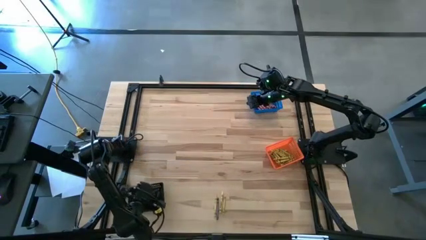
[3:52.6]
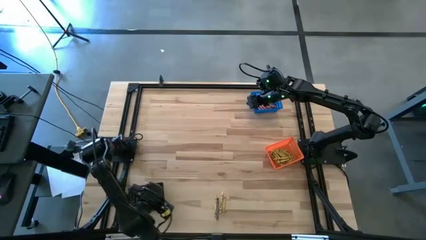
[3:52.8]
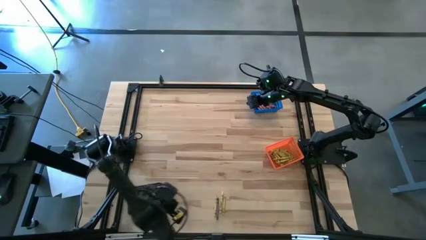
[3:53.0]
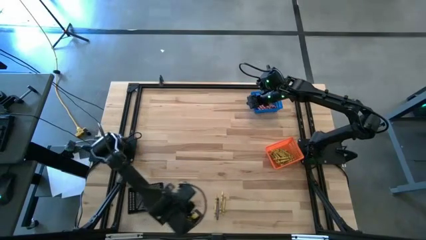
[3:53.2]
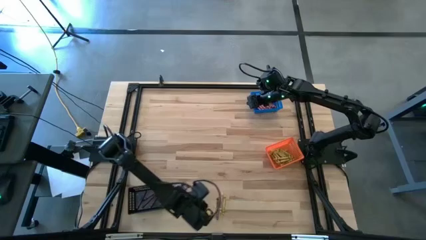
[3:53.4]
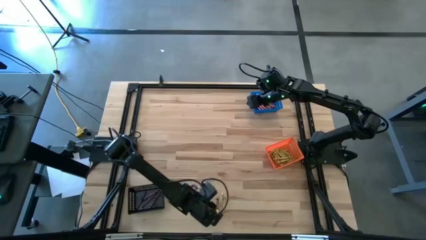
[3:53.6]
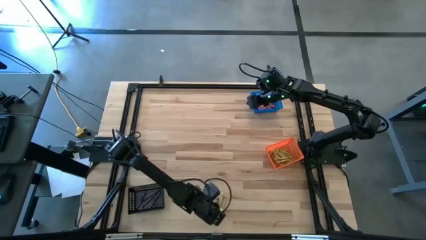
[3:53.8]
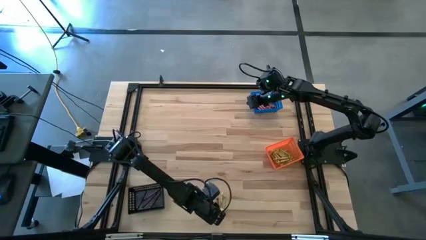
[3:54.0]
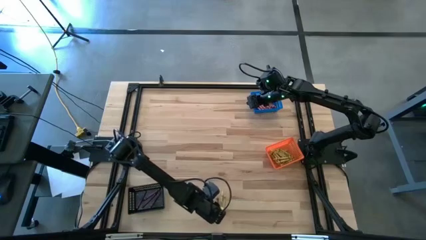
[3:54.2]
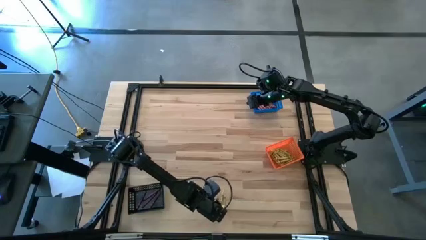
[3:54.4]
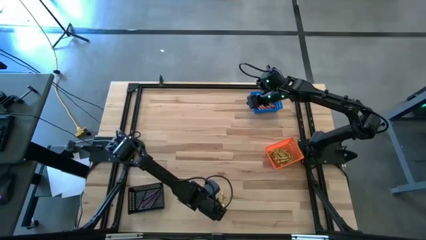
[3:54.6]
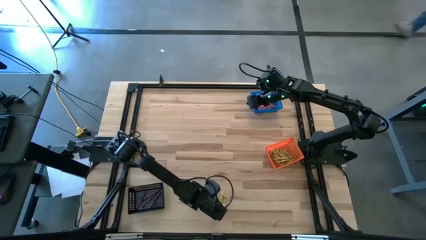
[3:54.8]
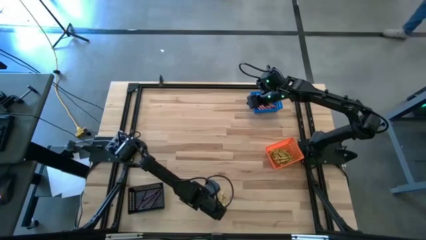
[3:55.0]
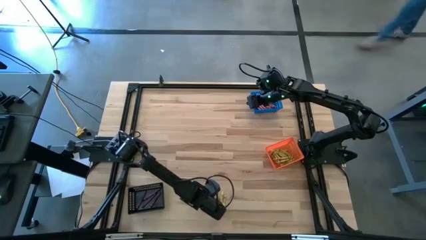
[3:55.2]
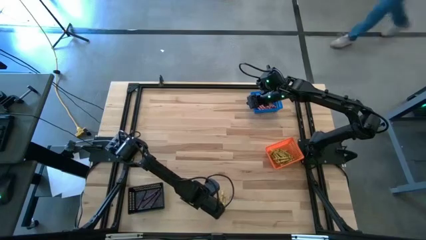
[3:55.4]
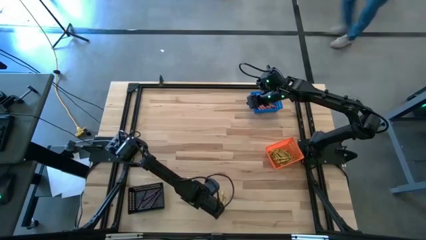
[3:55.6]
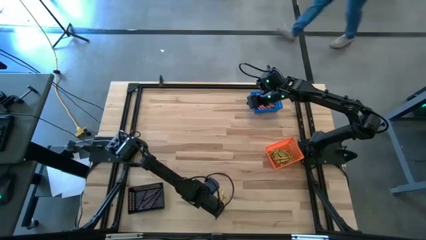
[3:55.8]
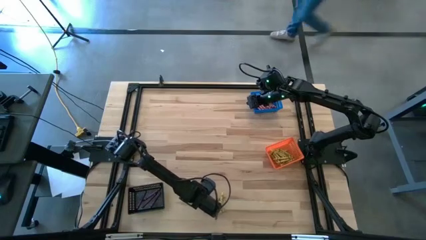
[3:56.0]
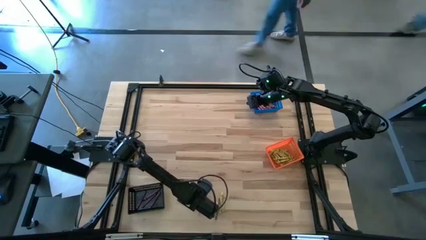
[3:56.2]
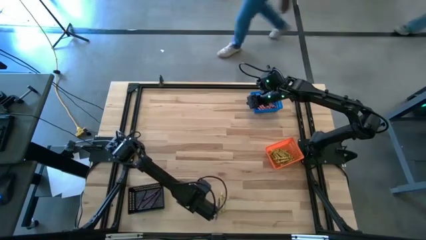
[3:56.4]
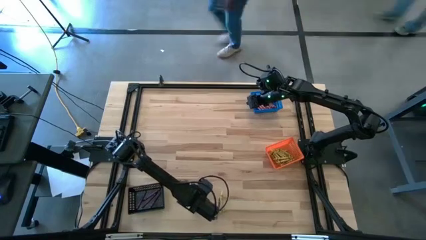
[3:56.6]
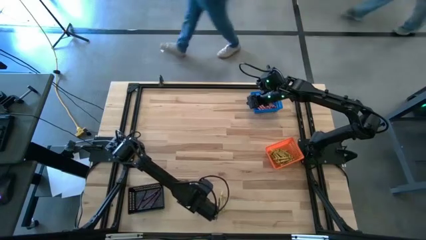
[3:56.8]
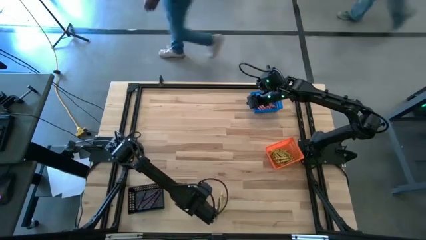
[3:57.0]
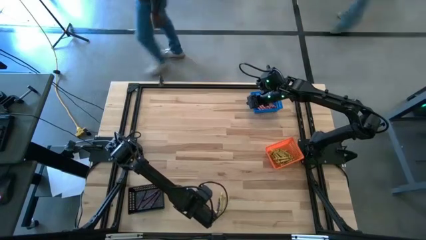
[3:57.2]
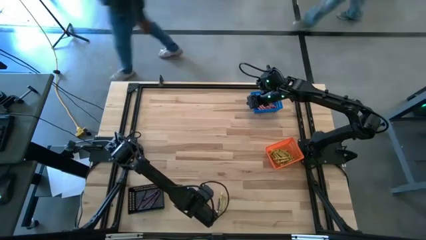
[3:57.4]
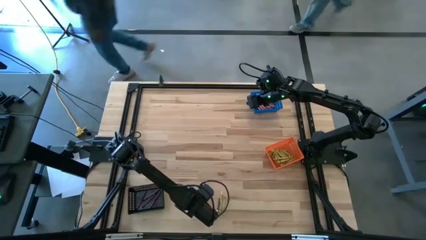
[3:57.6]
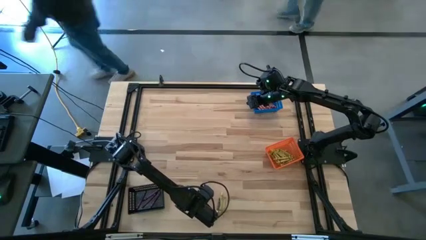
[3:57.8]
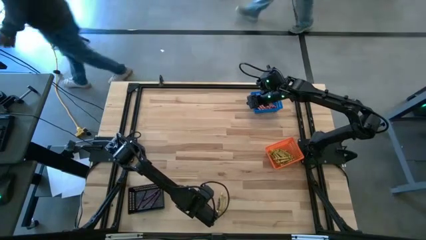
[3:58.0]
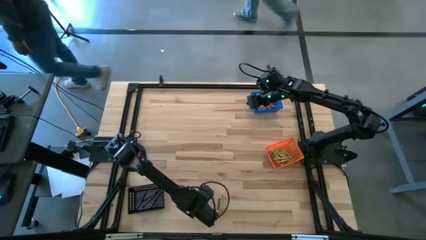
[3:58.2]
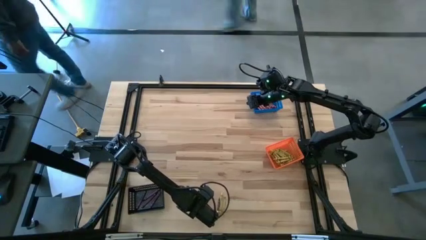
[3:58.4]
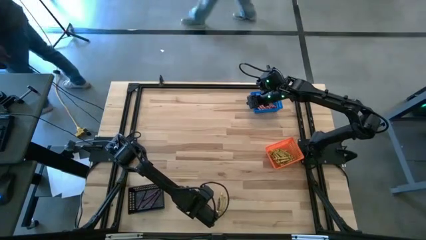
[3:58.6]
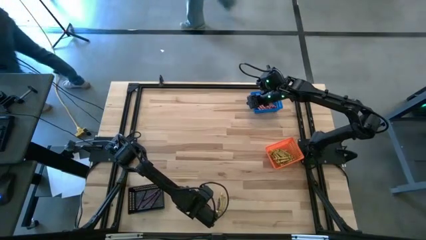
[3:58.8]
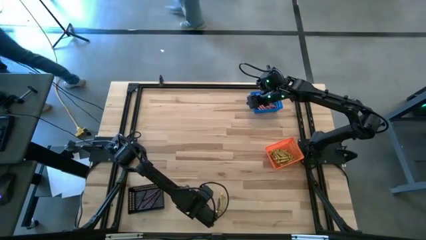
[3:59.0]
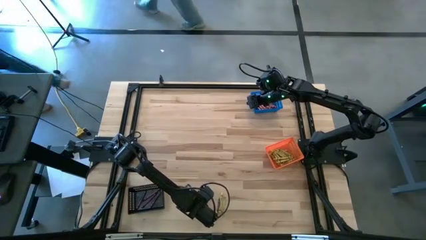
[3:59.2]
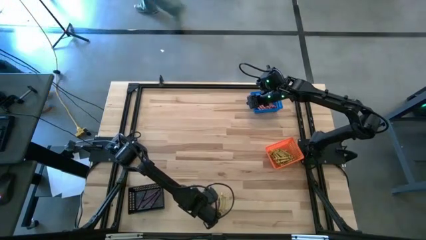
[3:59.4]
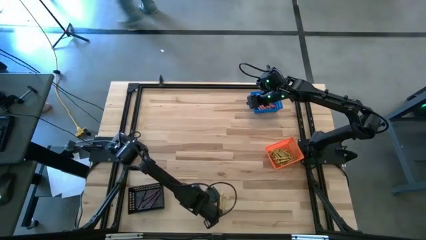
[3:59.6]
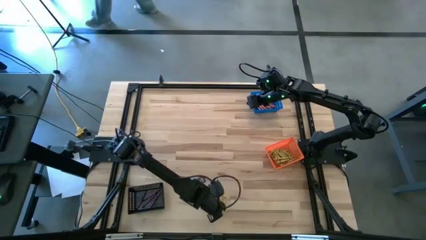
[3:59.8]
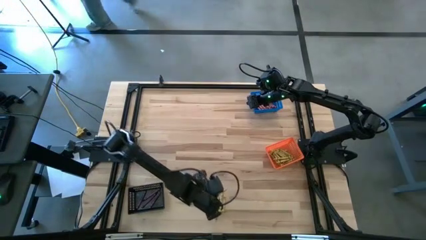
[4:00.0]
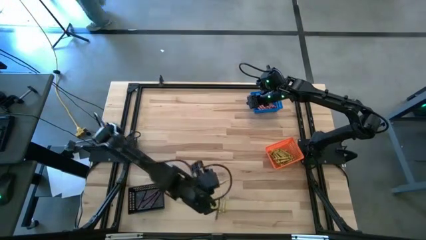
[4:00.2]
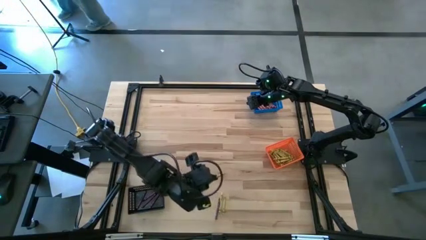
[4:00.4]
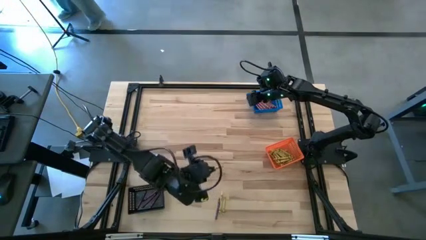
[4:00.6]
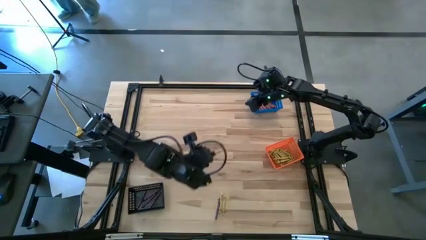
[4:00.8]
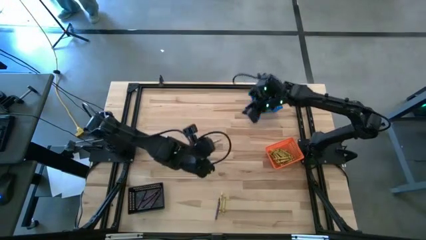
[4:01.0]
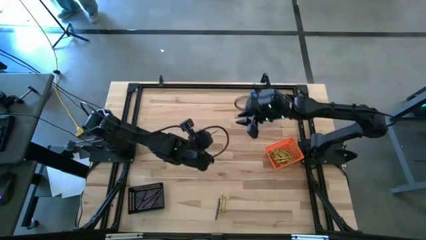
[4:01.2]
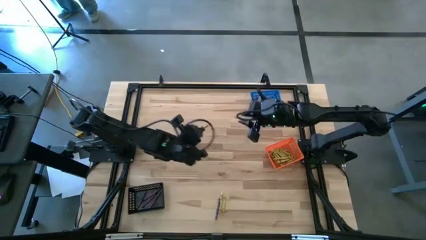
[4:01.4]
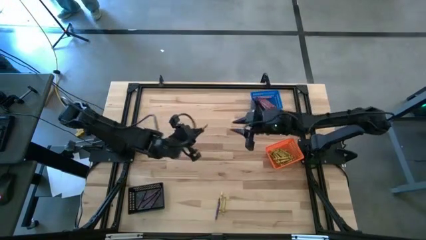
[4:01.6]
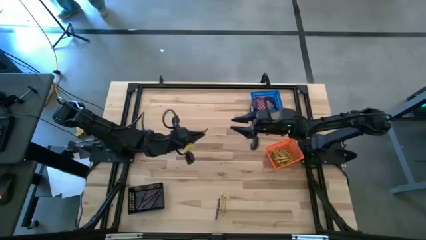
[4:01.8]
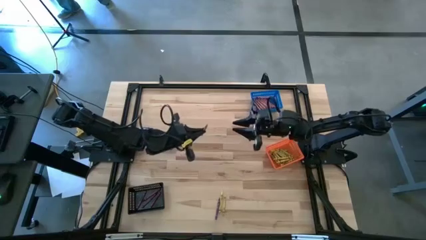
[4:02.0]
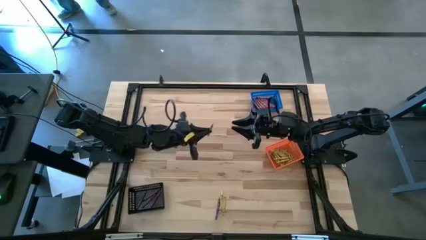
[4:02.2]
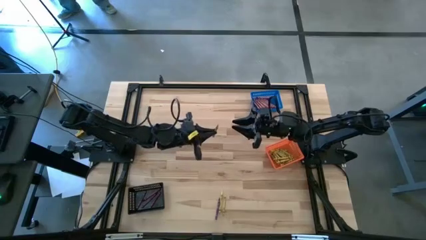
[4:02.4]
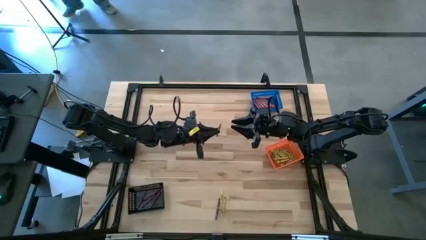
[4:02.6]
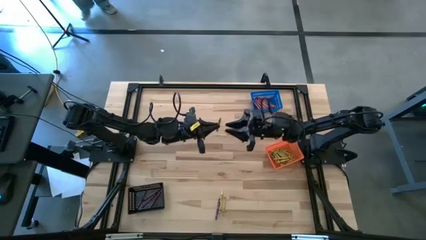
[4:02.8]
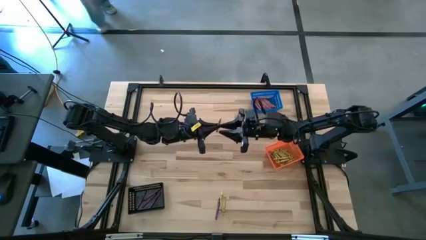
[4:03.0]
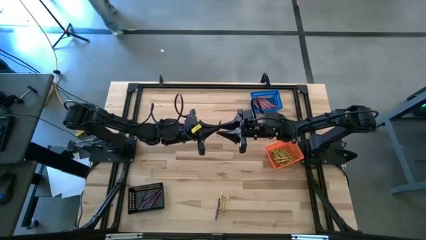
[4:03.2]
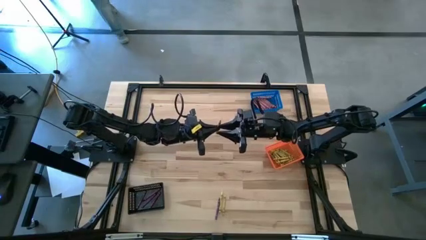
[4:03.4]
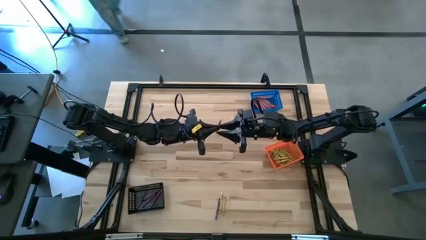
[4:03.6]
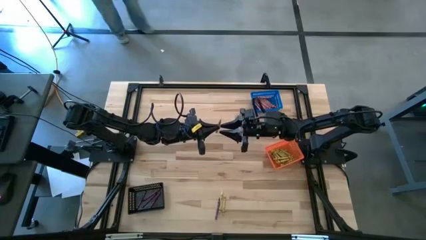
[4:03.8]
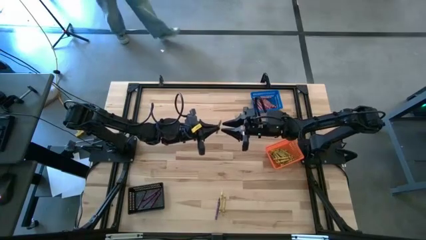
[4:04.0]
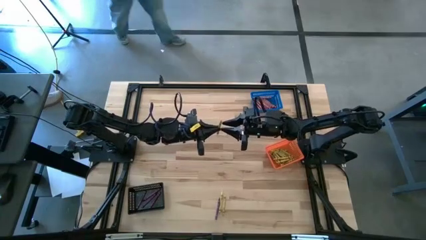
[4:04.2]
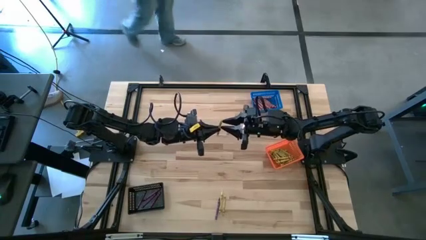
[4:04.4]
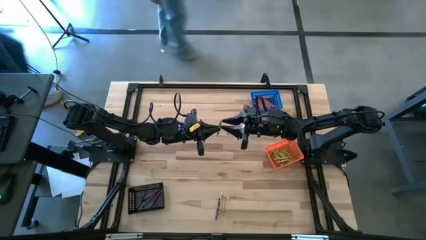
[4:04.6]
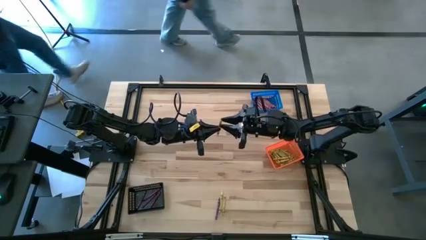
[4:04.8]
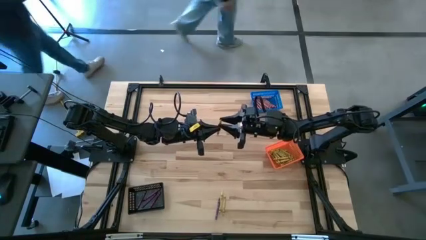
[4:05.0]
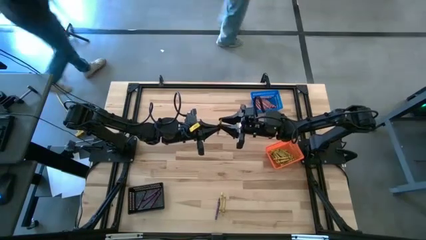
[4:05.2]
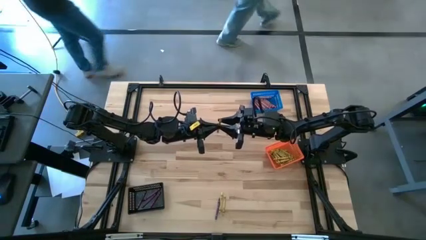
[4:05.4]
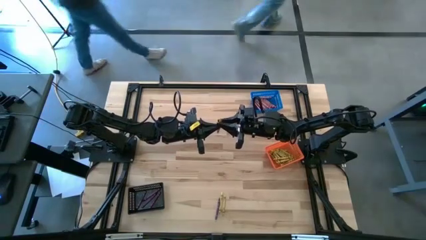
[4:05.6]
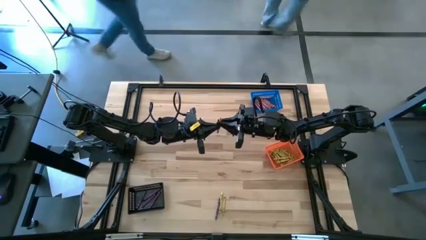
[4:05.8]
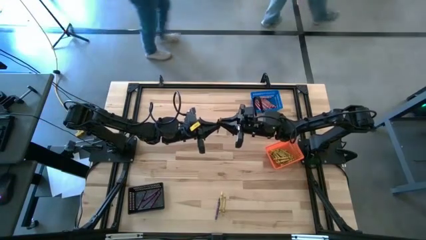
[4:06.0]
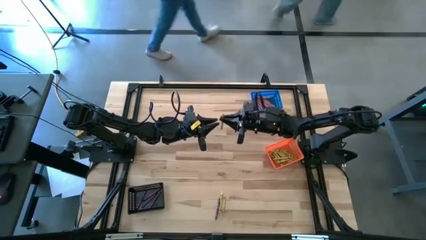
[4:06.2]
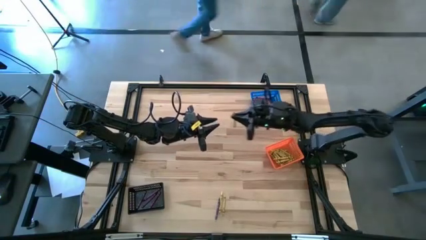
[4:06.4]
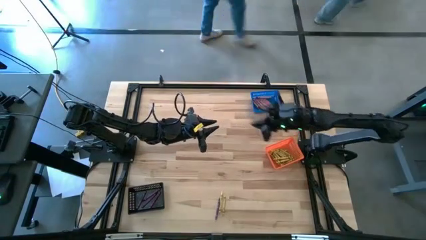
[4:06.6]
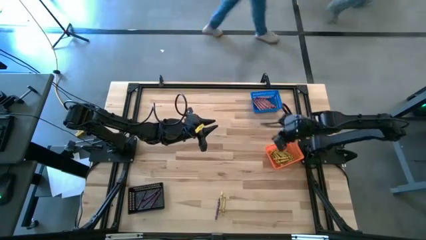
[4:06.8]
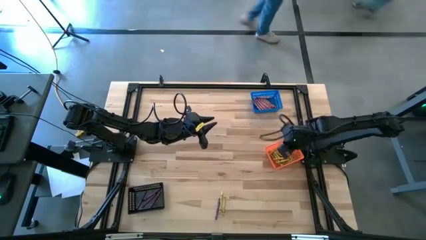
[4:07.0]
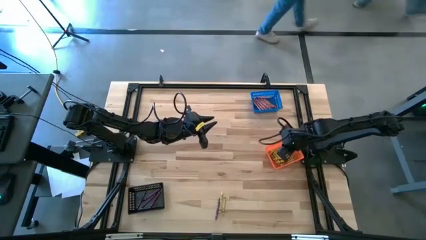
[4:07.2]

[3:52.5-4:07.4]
Task: Sort crayons
Put the yellow crayon into the orange basket

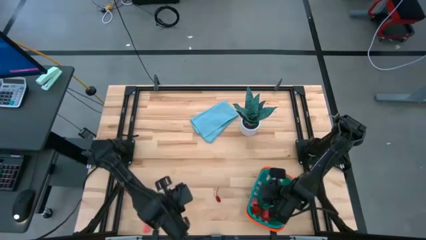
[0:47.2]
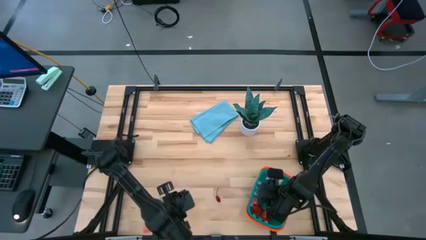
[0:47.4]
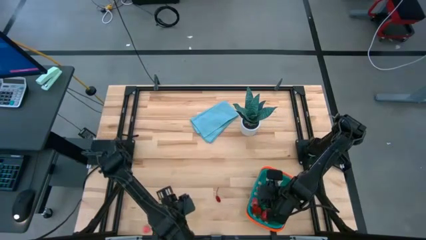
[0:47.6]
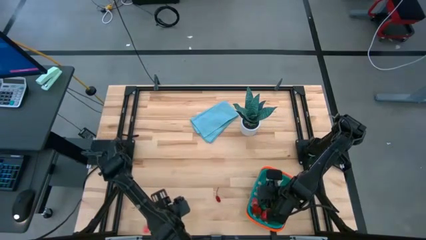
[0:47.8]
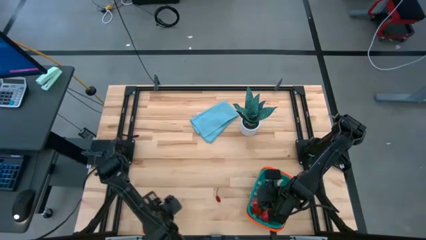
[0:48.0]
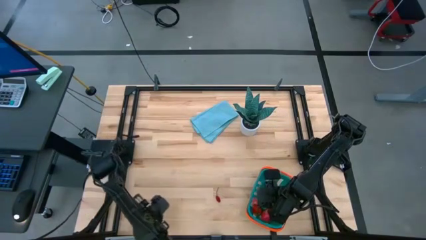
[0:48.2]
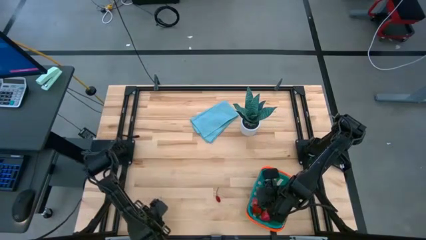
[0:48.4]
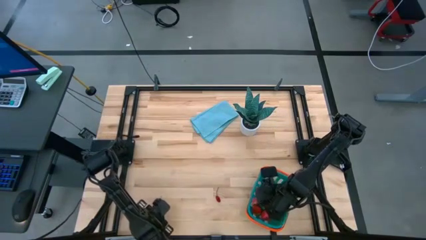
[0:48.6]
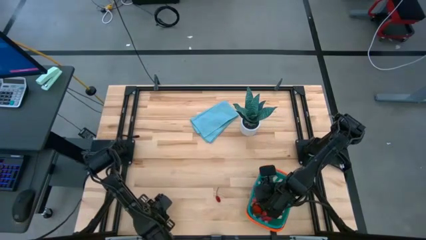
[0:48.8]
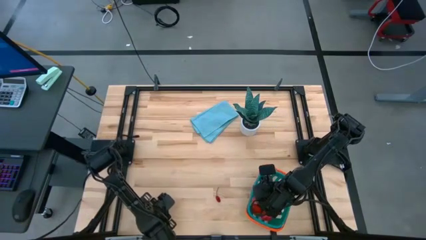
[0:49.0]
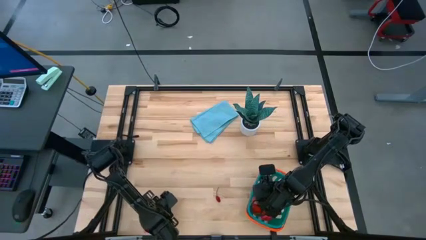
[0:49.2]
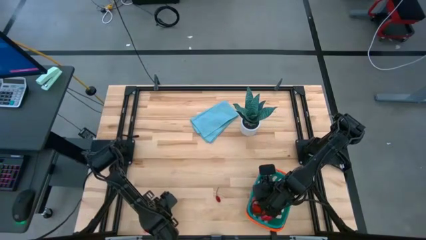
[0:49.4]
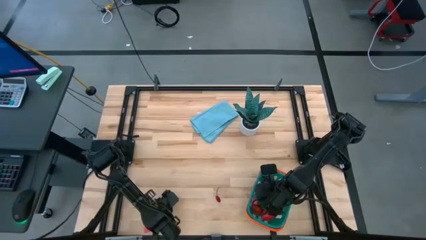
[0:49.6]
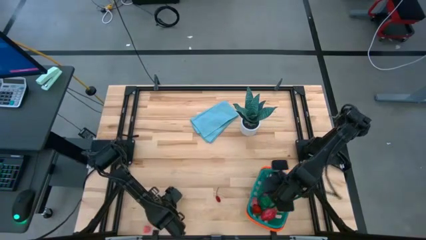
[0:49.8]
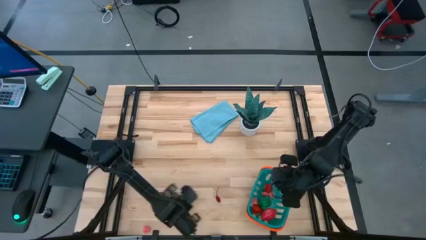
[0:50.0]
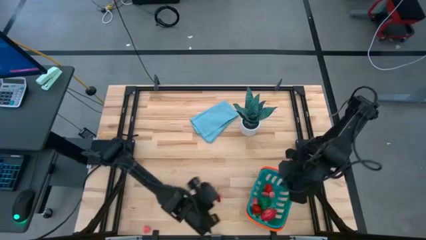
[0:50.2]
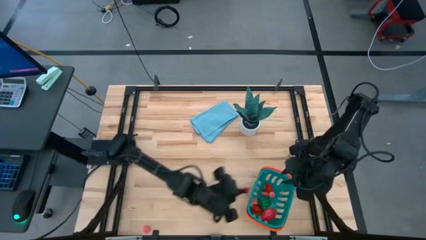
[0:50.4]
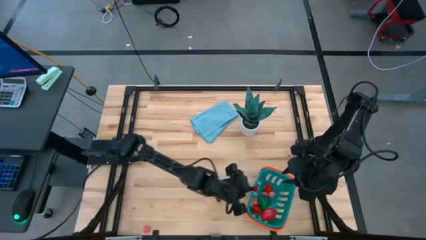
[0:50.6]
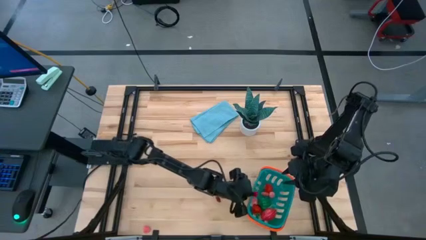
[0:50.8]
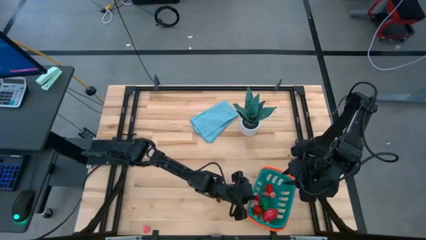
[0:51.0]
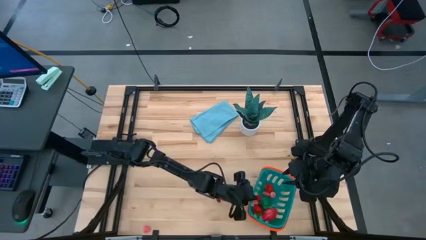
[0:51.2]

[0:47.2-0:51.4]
Task: Pick and placing Produce into tupperware
Put the left cherry into the basket
